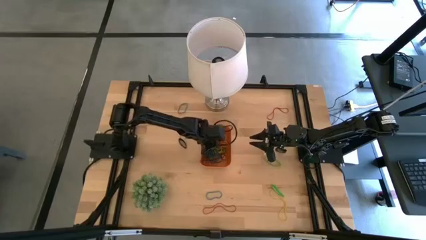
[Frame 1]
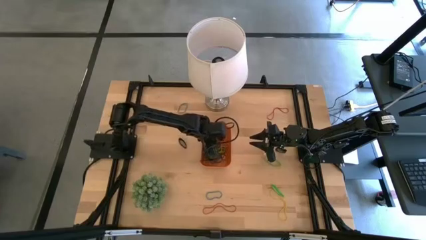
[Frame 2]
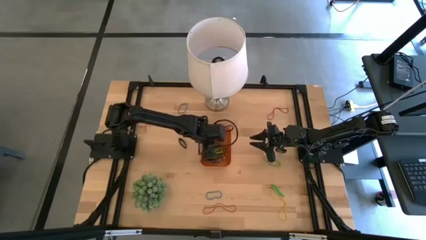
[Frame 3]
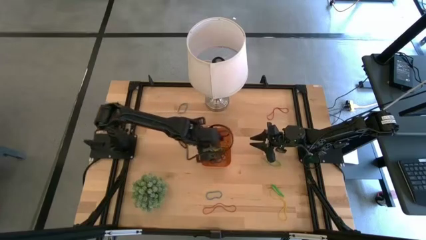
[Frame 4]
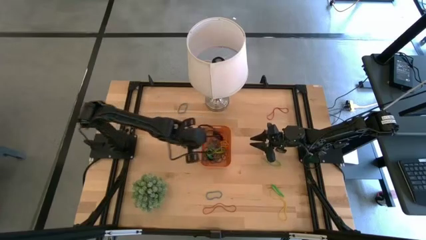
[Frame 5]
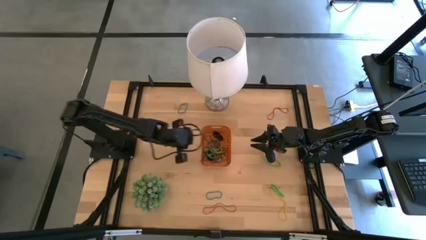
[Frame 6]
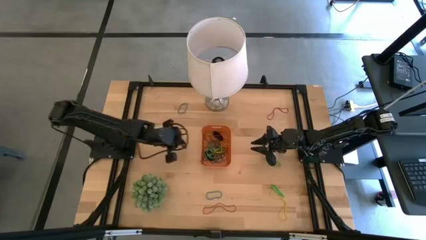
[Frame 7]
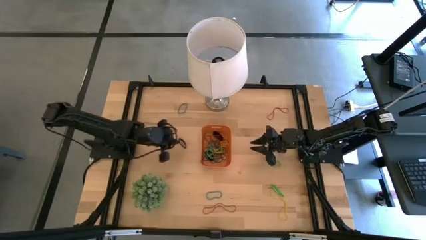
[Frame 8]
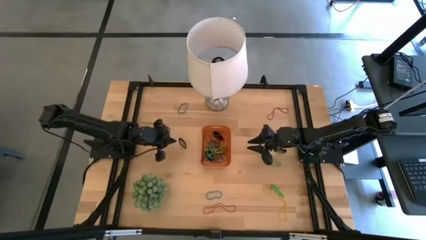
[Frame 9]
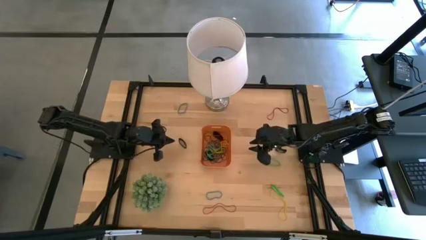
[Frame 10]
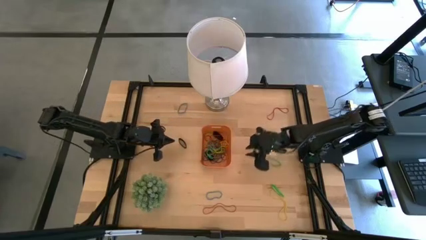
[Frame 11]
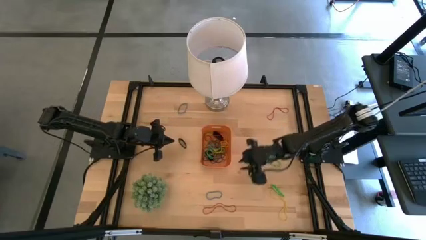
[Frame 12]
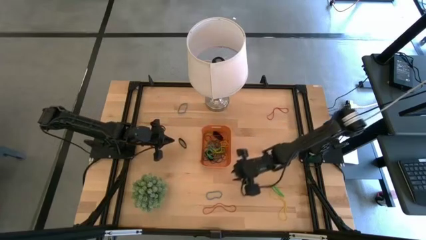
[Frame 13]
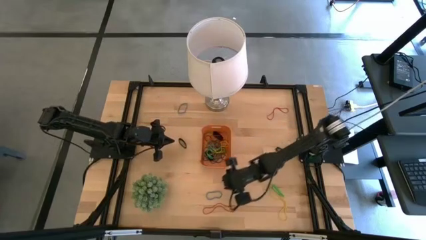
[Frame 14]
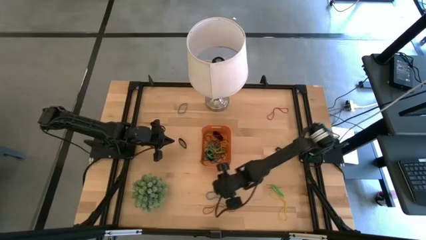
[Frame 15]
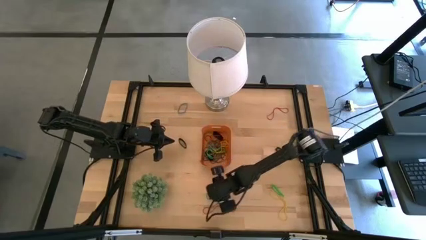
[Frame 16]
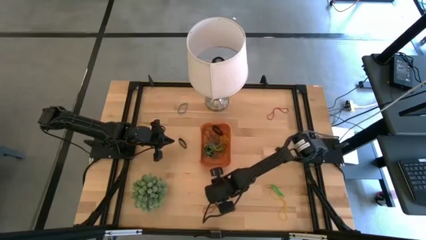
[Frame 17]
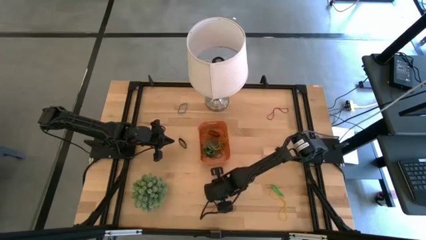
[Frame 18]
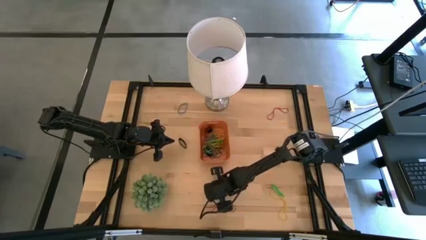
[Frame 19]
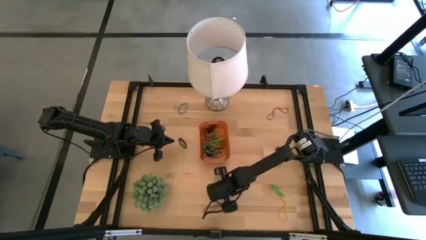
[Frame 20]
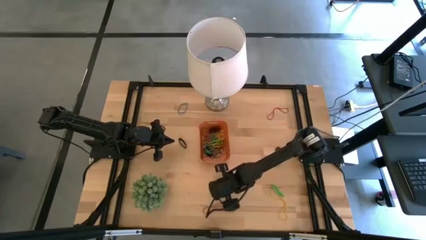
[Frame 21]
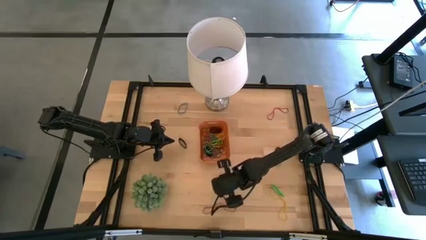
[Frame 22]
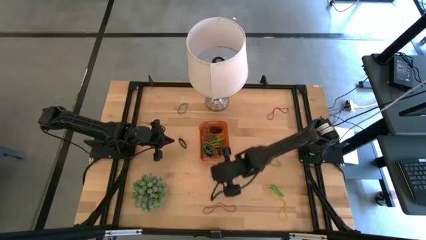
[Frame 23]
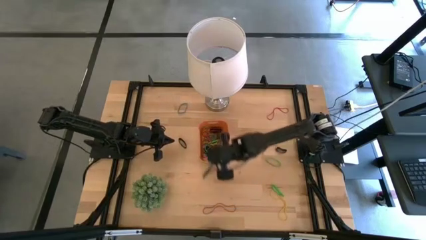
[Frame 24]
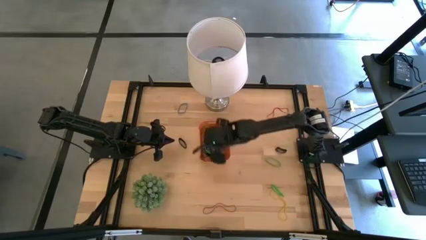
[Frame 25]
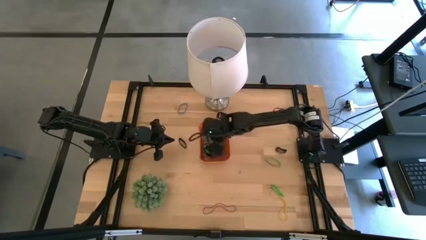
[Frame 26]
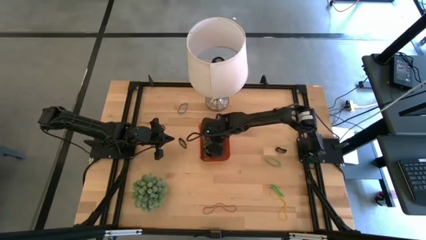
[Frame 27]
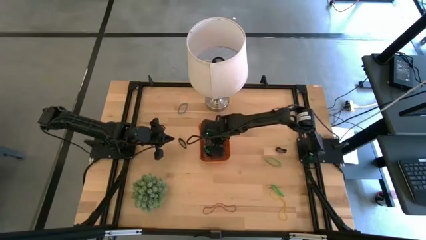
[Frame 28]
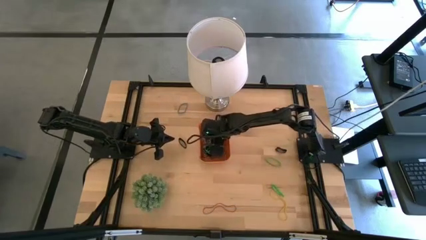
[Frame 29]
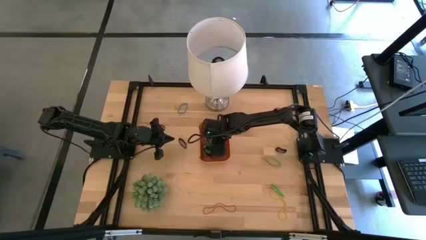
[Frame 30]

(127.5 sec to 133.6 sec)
Task: Pick and place rubber bands into bin
Put the blue rubber band into the orange bin

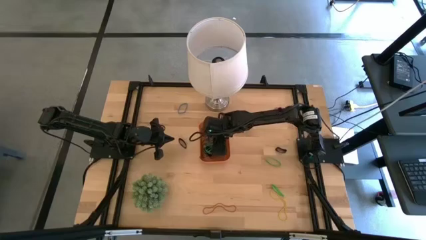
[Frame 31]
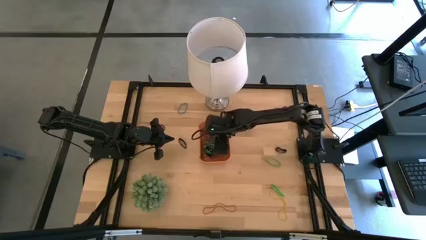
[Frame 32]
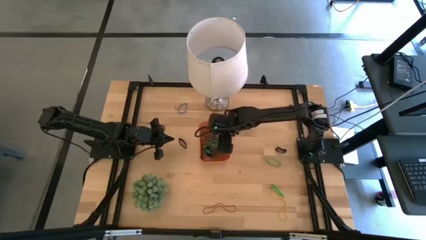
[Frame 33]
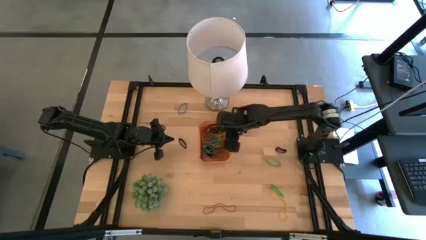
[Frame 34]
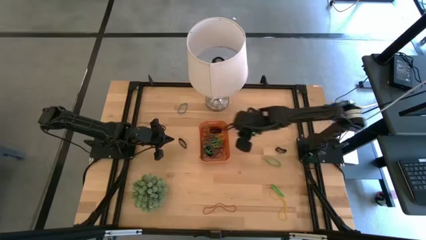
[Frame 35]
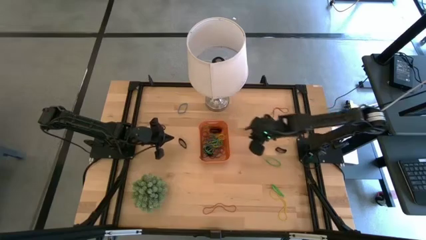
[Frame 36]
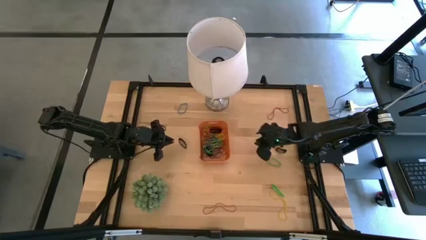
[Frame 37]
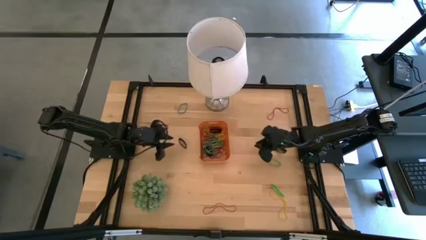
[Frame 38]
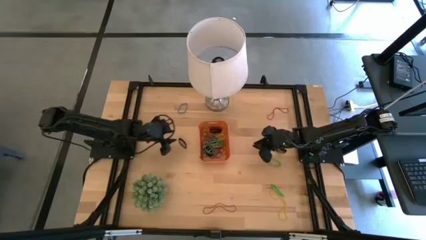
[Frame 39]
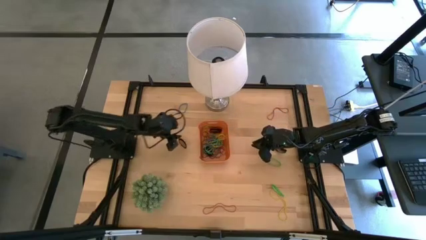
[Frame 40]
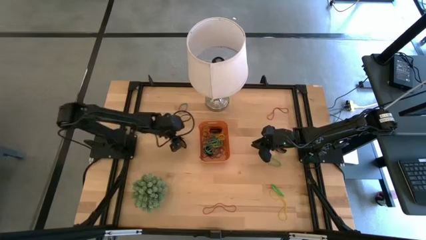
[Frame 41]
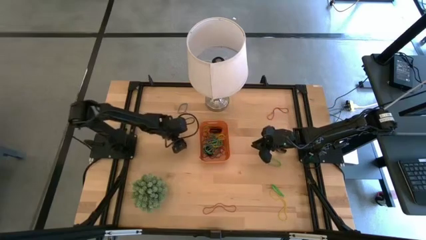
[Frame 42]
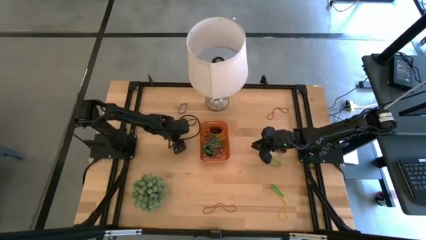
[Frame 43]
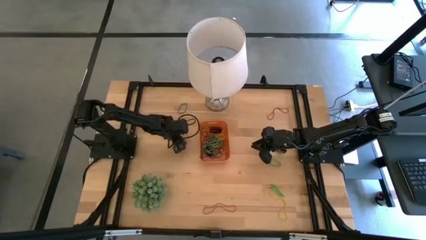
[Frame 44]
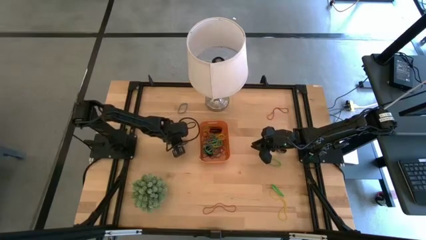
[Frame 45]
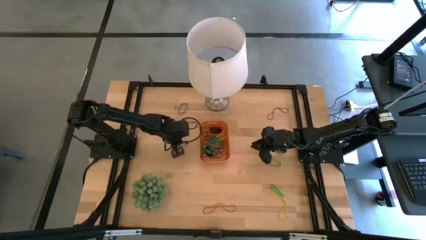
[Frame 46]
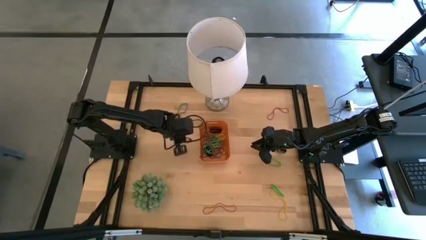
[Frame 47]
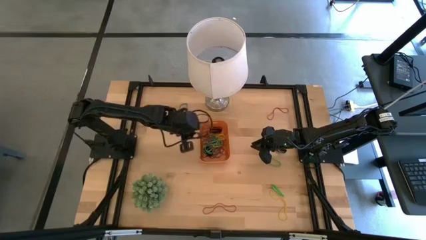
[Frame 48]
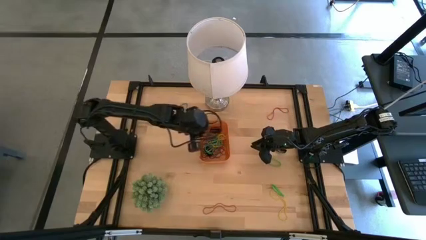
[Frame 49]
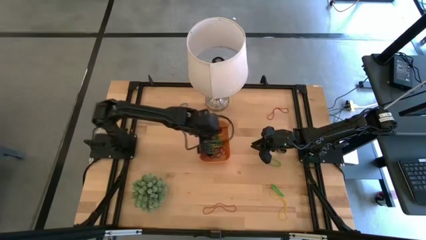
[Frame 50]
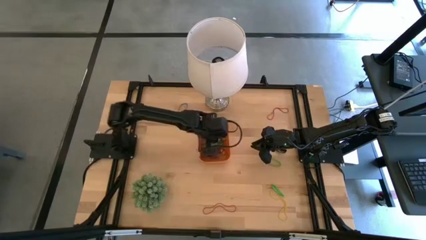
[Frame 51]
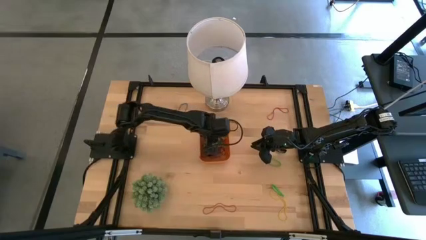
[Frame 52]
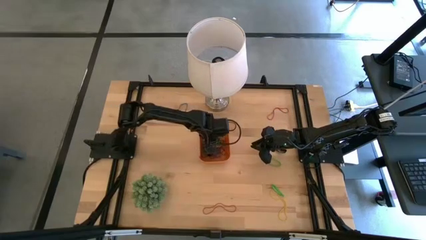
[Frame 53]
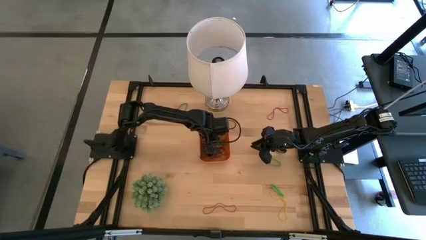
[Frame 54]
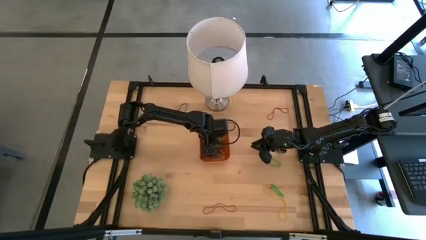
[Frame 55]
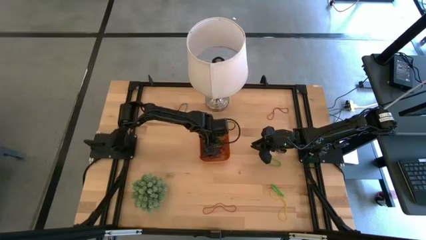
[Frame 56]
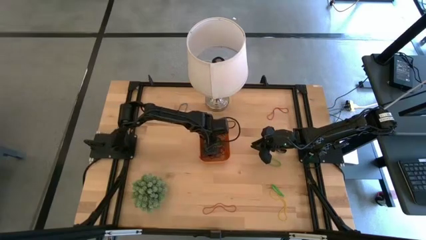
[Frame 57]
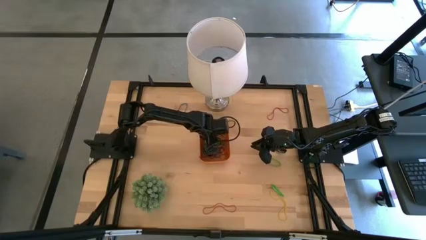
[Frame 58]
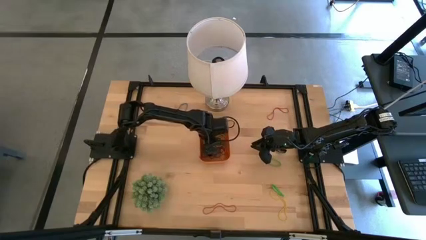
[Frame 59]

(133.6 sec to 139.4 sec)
Put the black rubber band into the orange bin

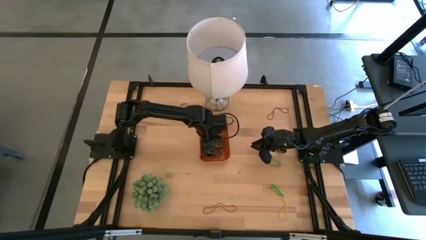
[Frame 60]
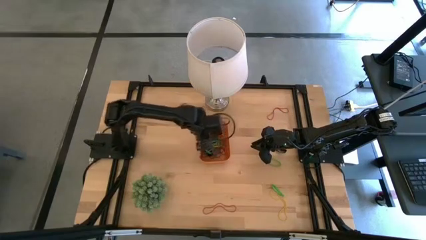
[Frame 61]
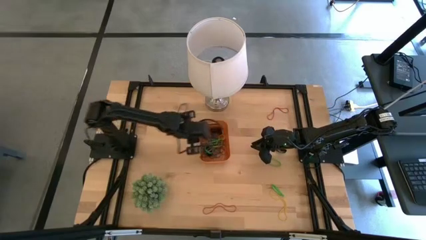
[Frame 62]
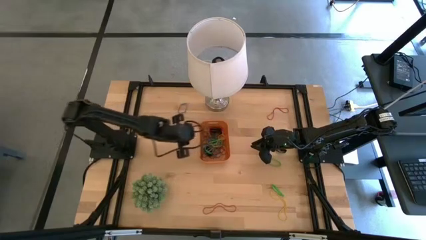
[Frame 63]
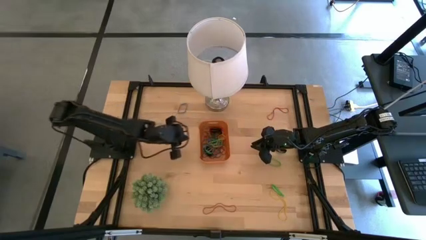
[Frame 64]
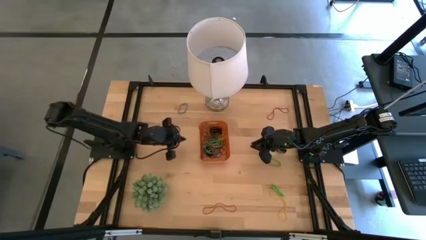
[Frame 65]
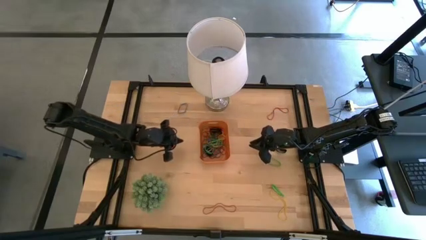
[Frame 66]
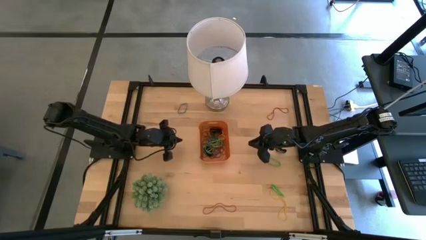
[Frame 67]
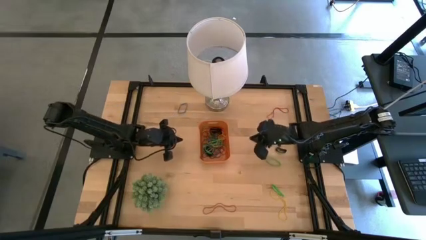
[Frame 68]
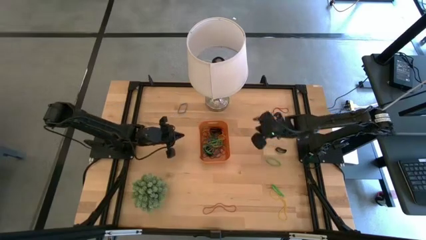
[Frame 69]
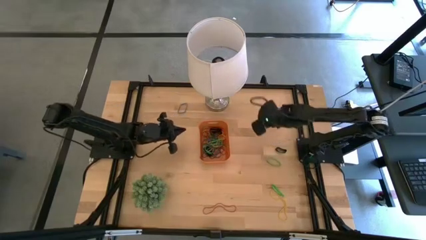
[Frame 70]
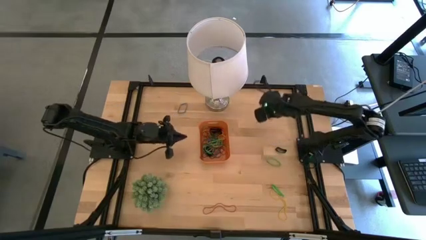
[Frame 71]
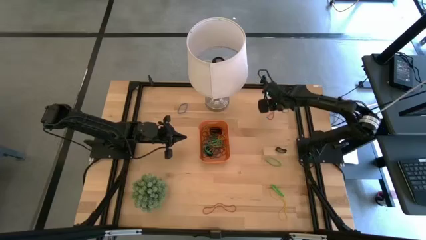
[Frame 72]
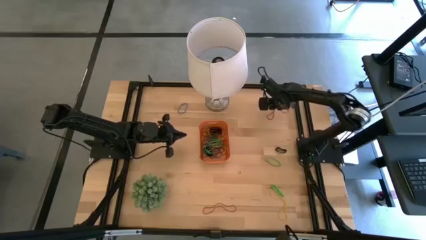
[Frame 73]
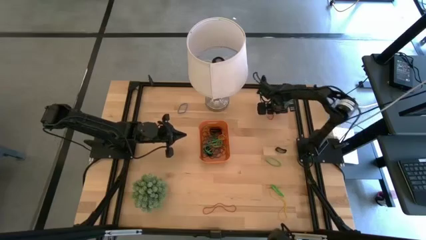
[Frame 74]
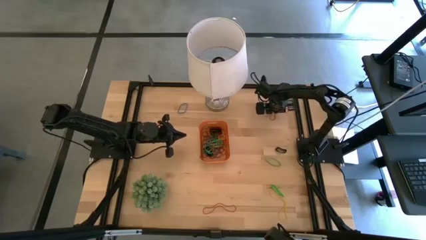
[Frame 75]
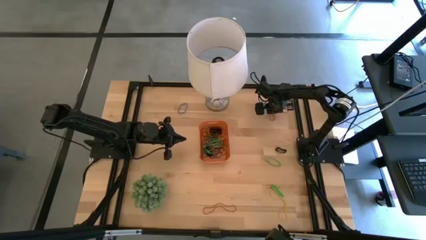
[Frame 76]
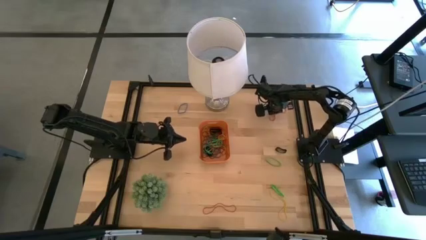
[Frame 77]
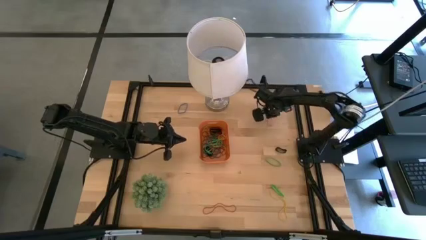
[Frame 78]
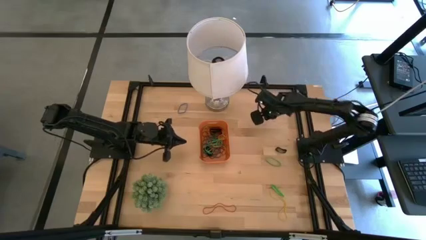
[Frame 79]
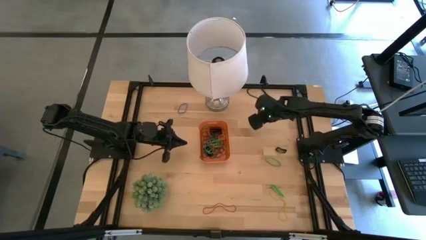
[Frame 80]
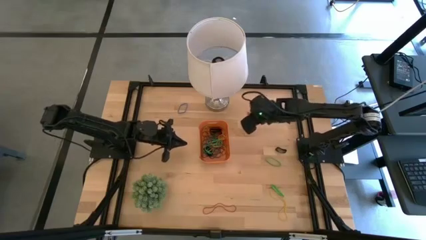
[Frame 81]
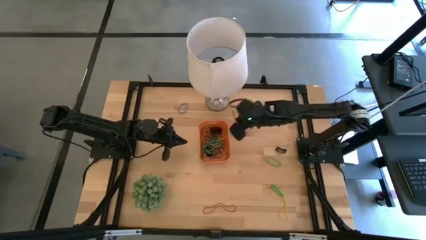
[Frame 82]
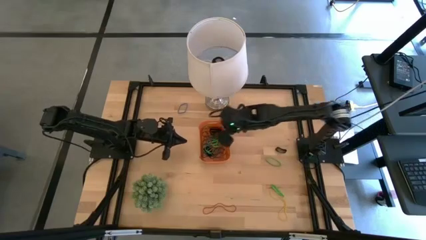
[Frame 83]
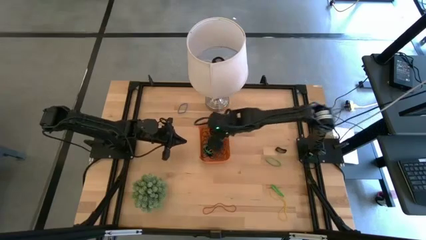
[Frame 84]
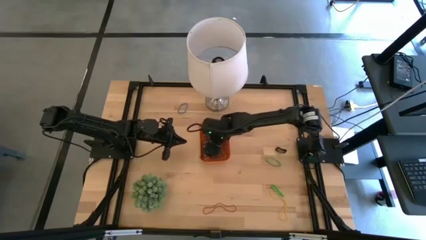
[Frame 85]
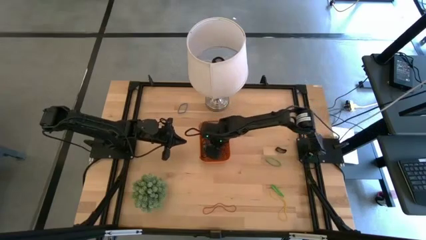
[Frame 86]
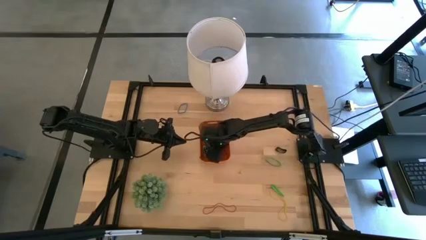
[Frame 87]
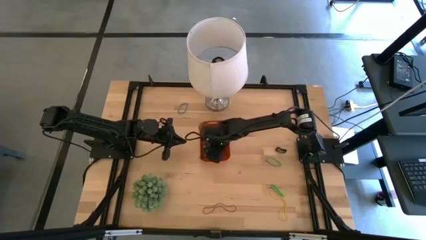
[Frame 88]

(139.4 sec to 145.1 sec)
Put the red rubber band into the orange bin
